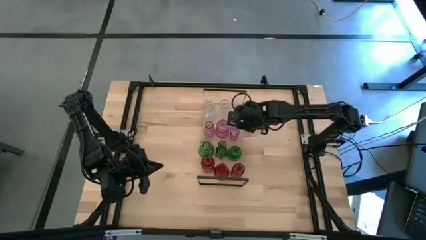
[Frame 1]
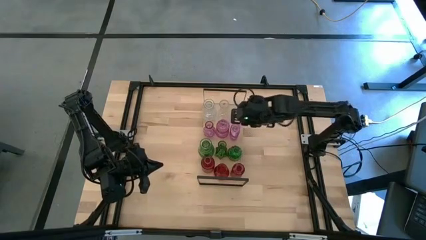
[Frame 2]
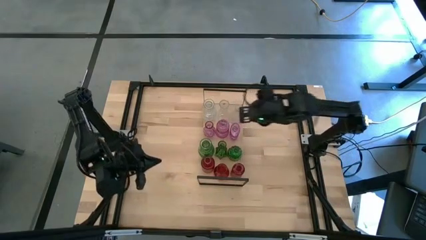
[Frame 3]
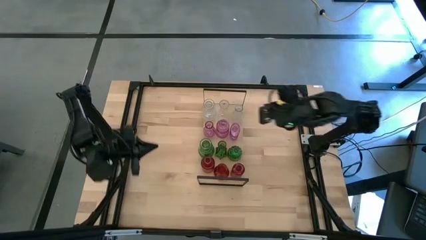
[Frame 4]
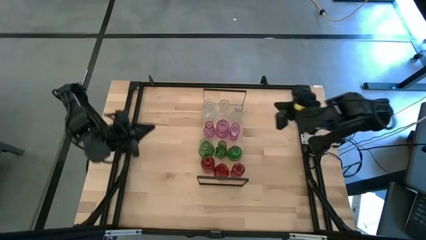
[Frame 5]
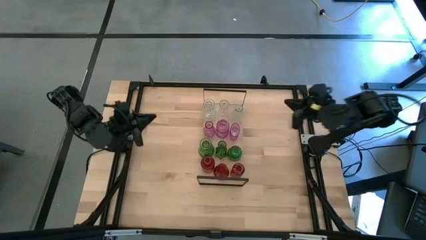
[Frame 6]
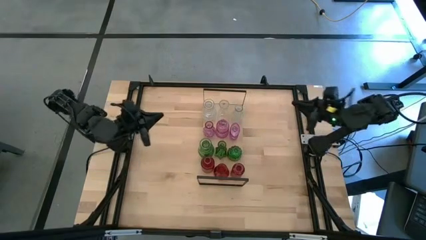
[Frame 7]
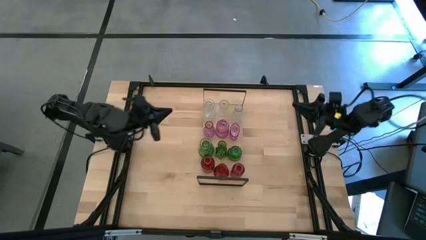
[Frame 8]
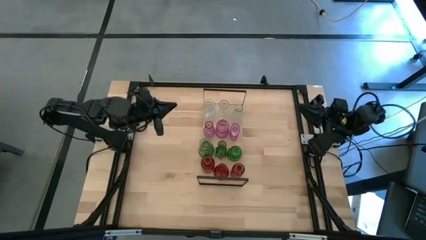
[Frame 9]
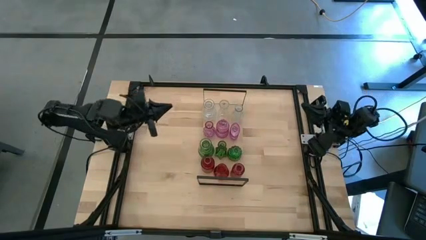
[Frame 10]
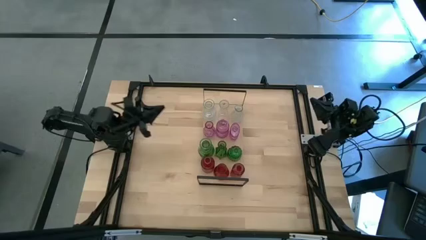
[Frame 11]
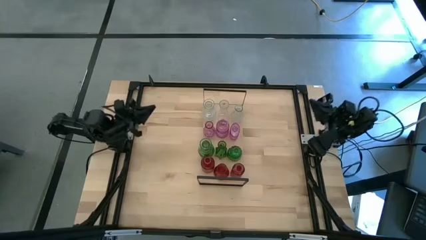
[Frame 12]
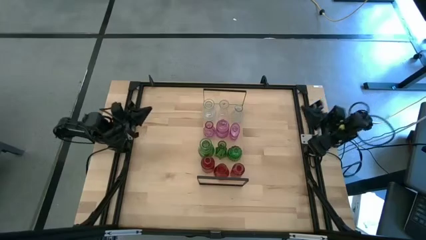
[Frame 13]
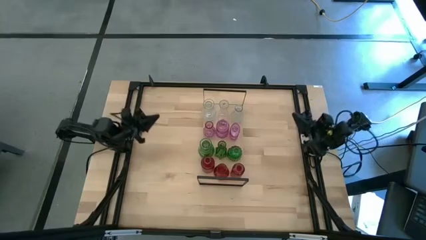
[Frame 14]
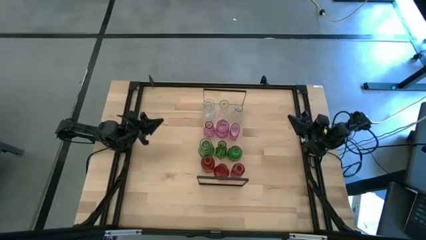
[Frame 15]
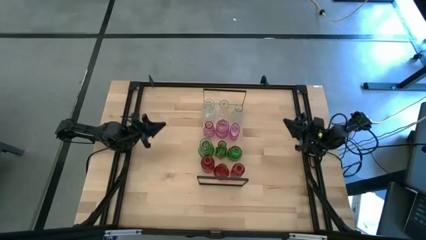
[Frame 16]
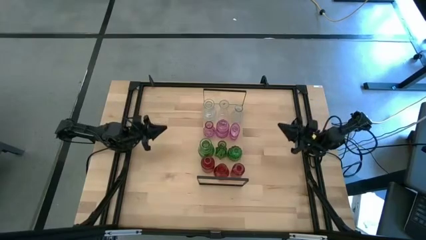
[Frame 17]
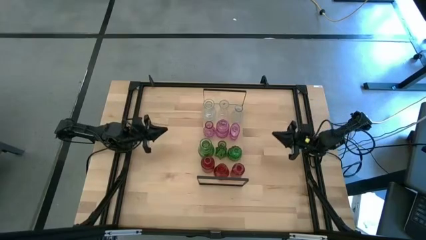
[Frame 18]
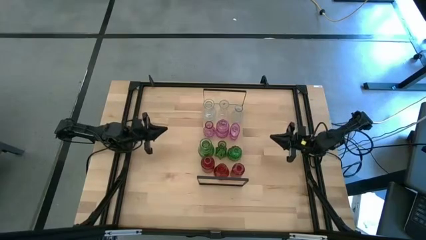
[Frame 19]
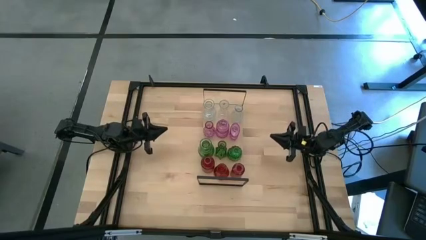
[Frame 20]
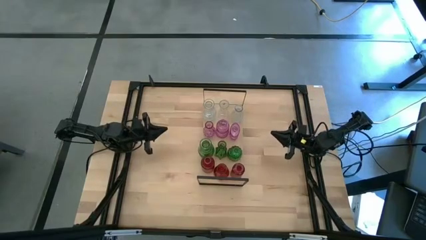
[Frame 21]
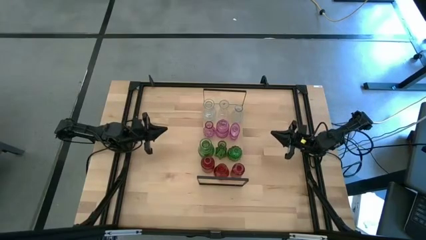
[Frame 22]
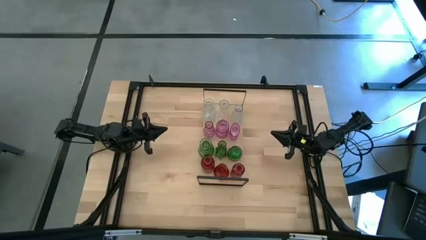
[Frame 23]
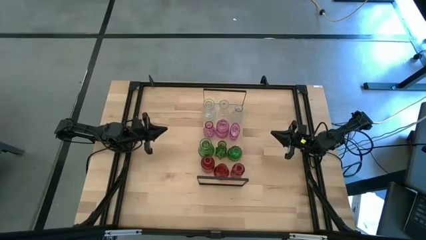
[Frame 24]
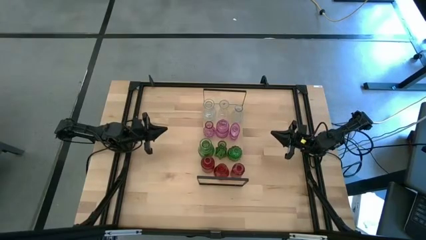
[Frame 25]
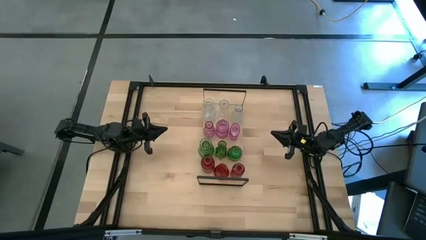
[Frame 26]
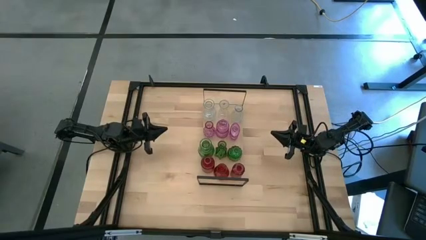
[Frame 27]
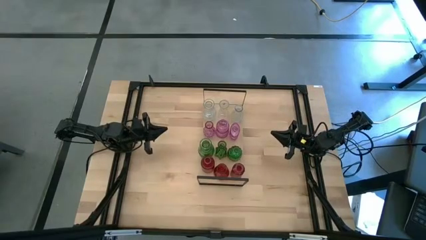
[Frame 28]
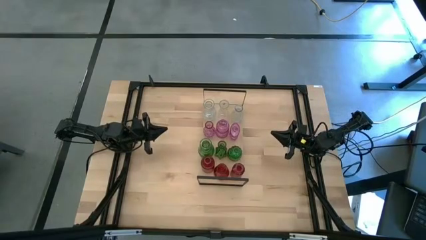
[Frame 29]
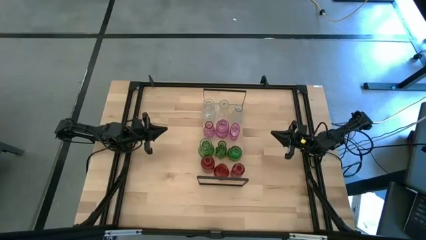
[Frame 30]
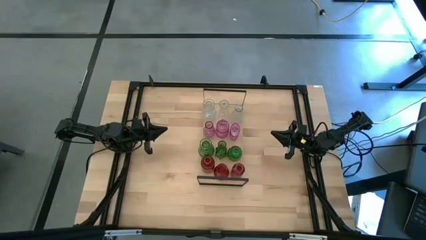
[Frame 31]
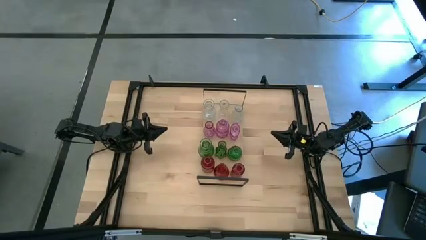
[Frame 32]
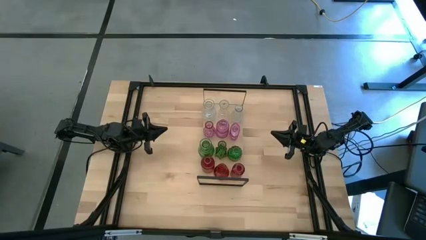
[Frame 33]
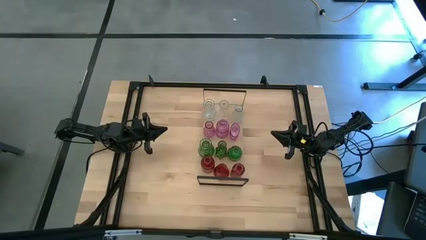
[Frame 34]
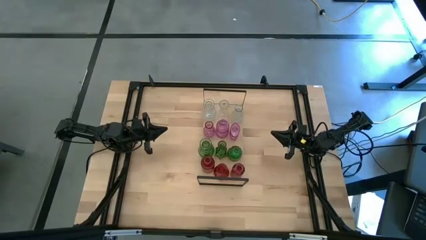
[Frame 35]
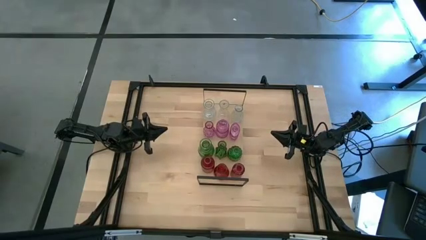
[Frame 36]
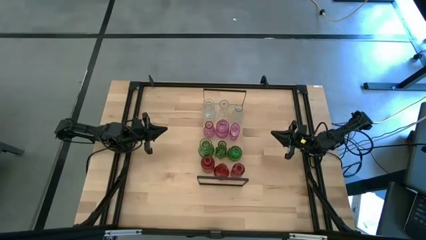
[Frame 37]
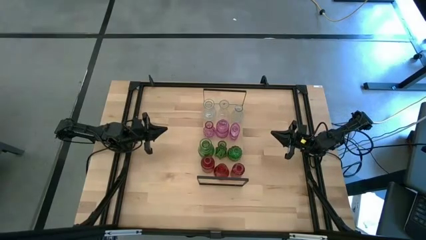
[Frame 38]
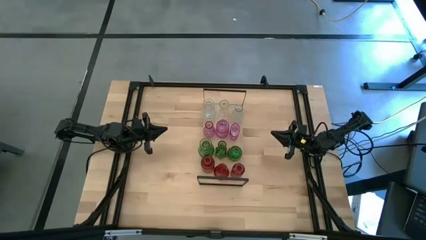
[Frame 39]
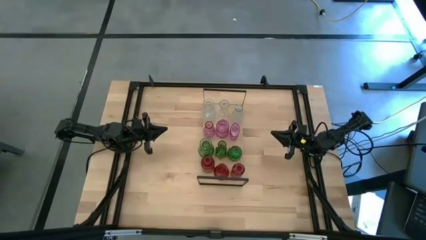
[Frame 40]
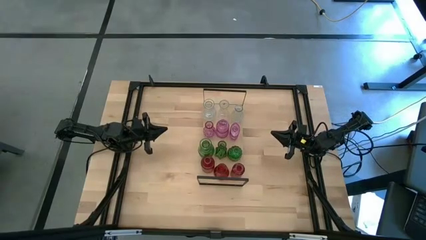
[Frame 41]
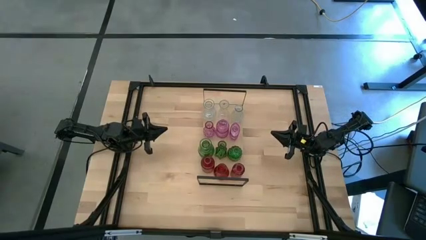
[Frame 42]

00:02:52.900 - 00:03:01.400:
Task: sort vases onto shelf
Return to Home Position

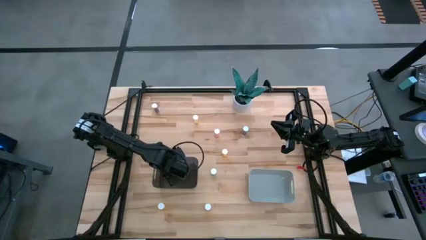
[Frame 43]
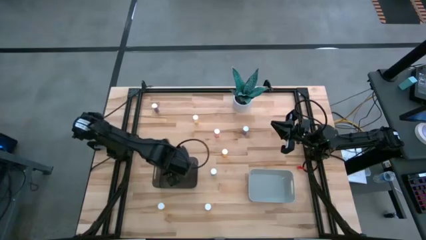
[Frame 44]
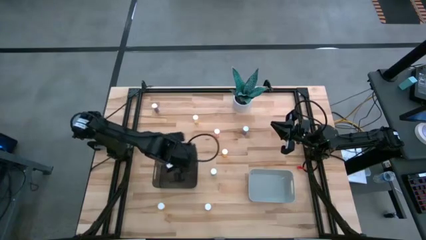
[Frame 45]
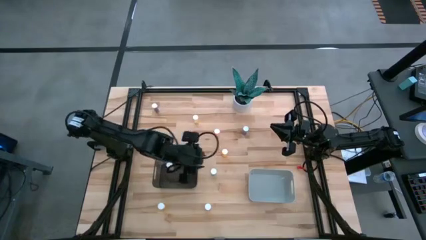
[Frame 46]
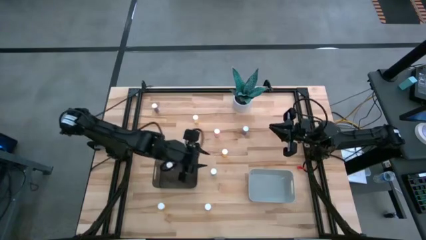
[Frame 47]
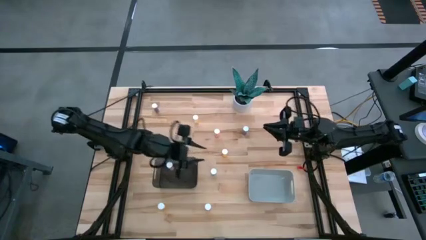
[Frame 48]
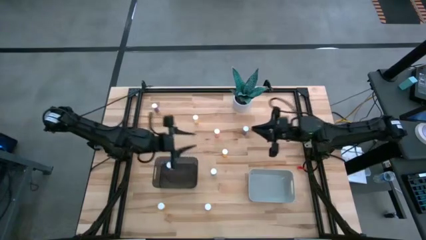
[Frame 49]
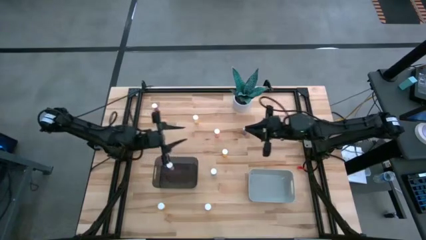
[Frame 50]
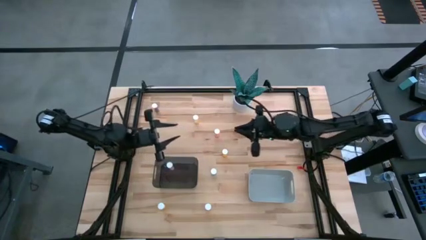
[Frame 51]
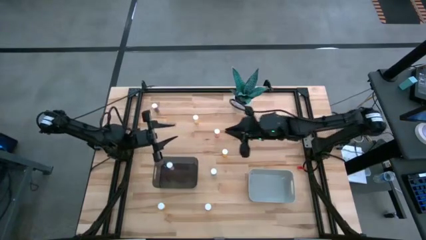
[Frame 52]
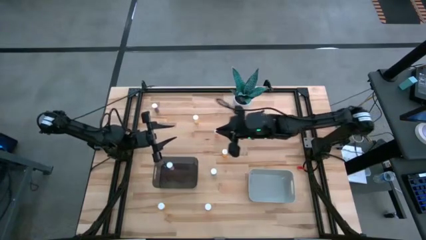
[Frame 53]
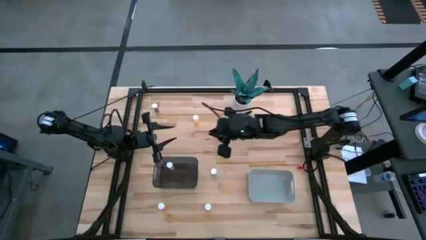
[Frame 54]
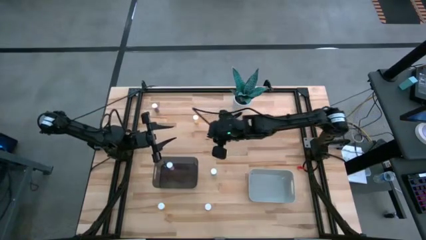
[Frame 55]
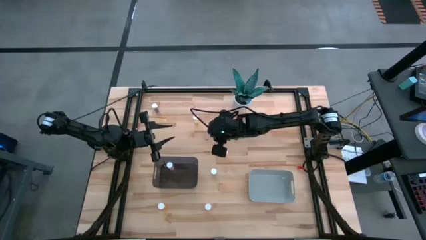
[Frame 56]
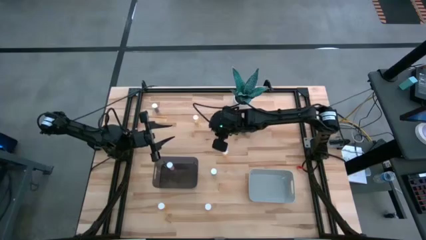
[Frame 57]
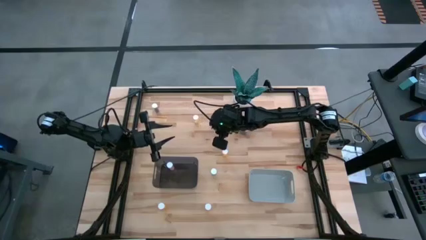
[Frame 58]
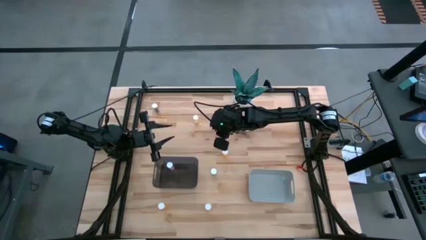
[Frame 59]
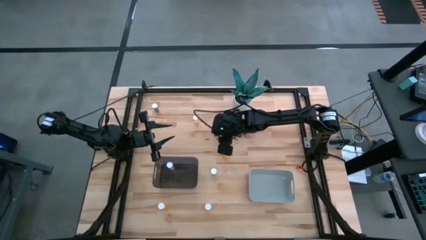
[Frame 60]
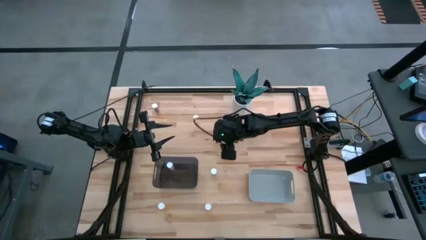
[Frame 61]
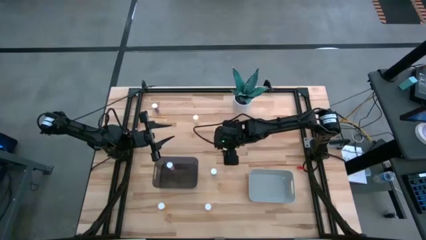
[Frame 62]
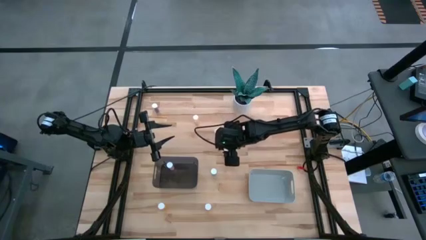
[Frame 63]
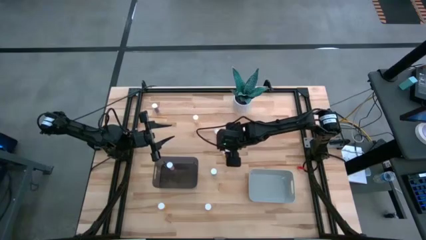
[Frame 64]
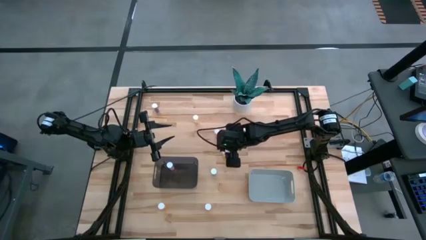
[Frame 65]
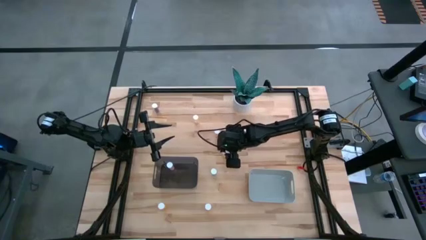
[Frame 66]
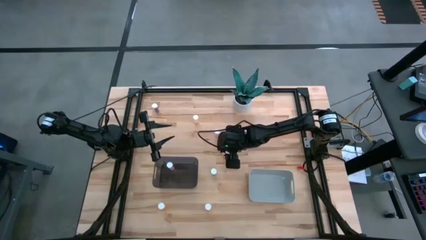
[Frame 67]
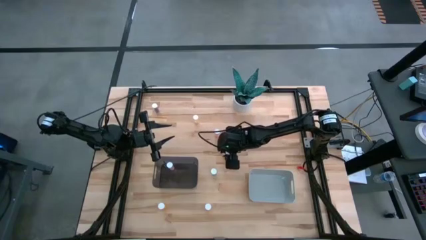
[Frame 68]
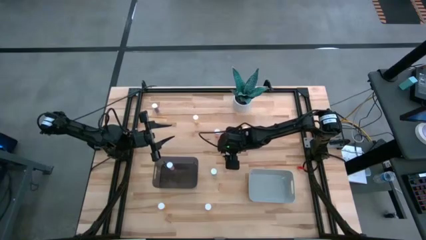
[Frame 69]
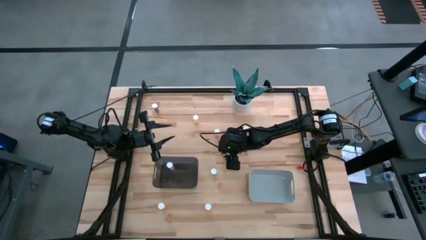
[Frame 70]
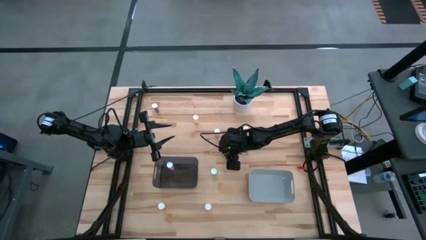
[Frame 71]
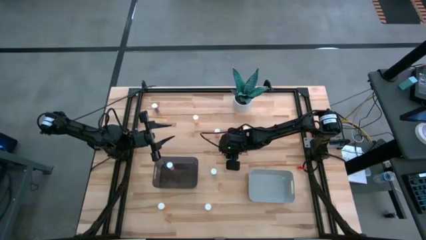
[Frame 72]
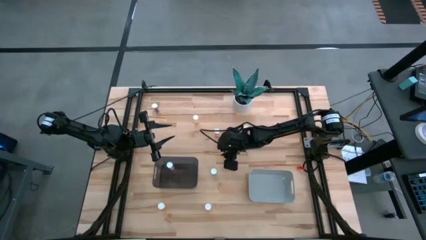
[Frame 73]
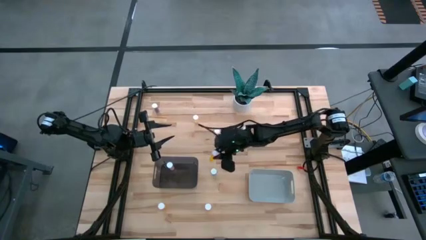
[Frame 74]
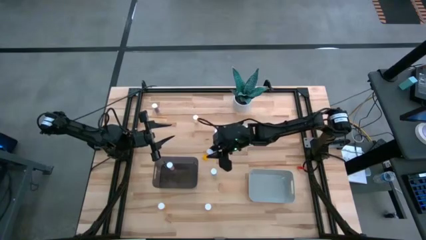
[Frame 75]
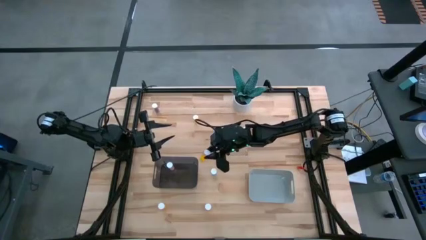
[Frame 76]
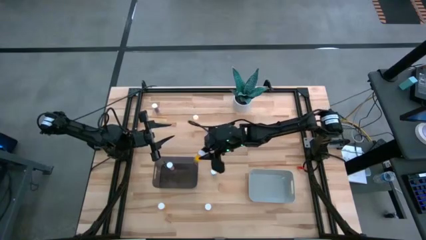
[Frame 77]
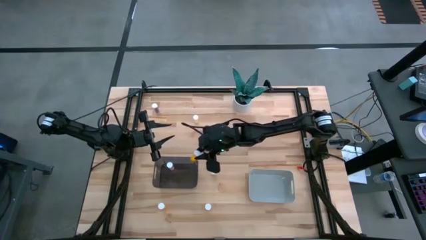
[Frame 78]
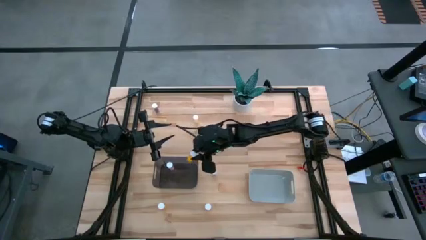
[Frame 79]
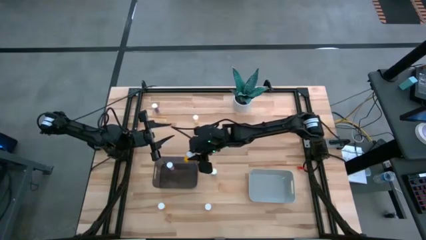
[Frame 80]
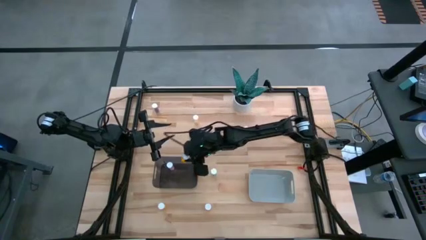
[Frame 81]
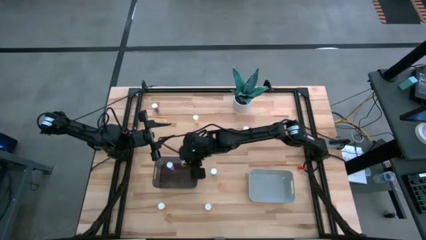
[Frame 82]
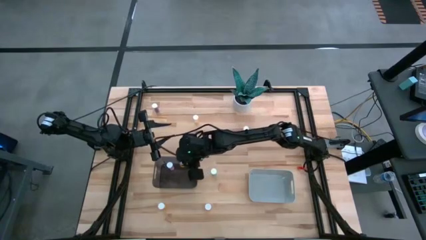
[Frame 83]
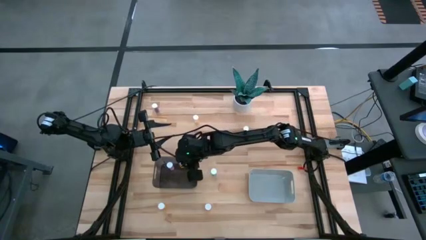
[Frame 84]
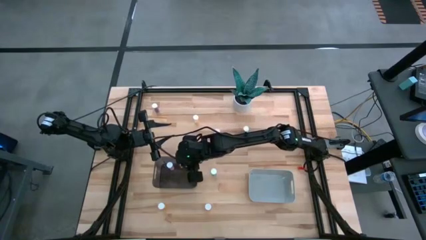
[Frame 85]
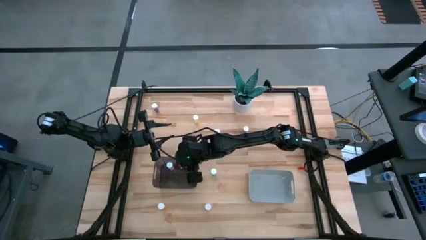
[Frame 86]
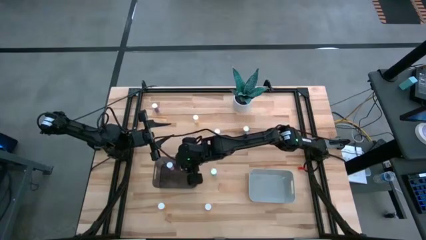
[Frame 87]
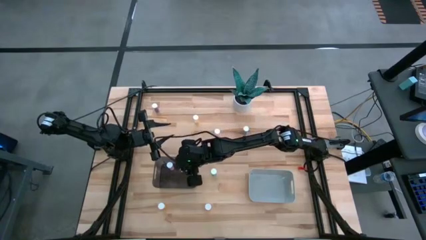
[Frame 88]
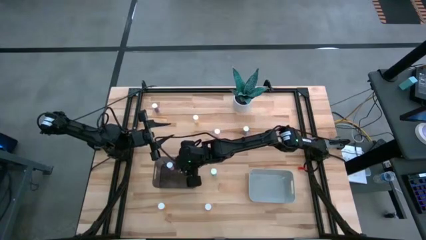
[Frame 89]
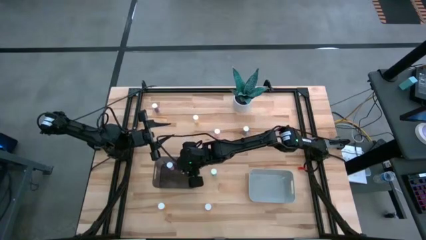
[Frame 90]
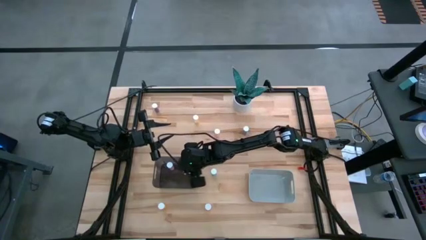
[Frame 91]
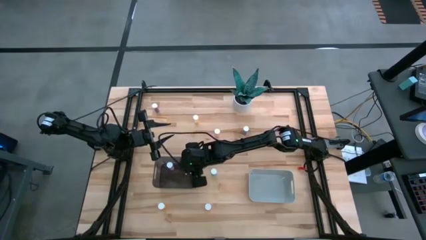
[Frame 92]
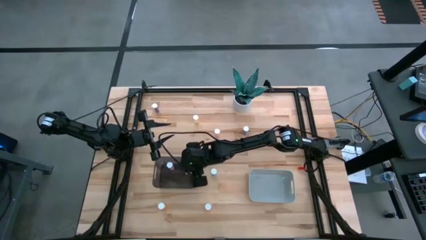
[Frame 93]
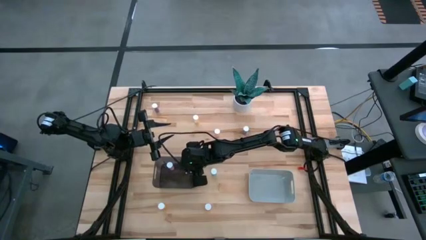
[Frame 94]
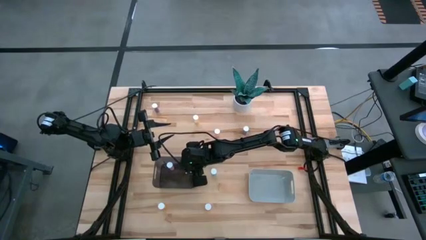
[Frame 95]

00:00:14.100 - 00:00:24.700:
Task: Pick and place medicine bottles into bin by pill shape (circle, oval)
Put the top orange tablet bottle into the black bin
